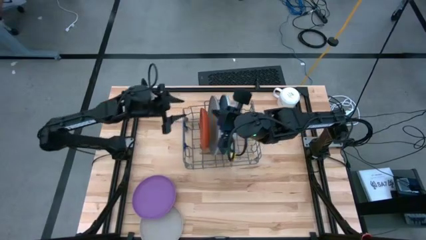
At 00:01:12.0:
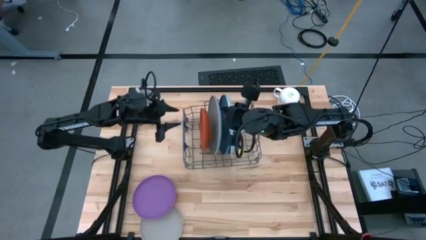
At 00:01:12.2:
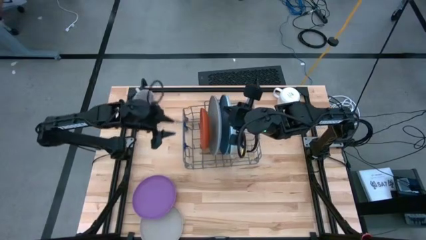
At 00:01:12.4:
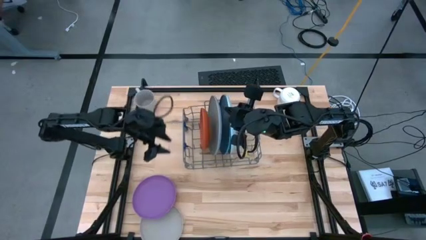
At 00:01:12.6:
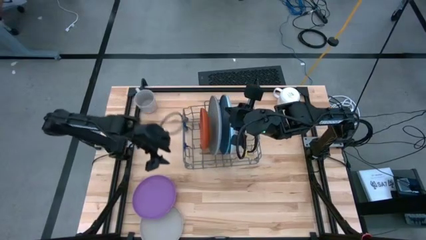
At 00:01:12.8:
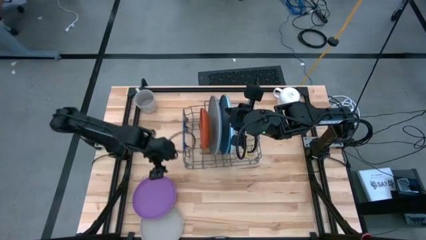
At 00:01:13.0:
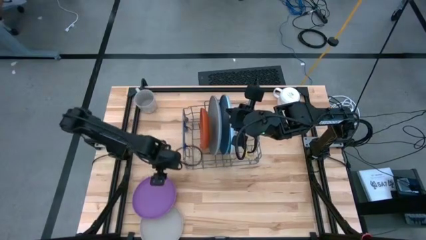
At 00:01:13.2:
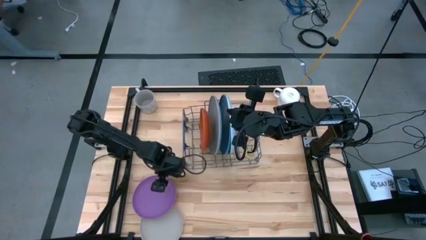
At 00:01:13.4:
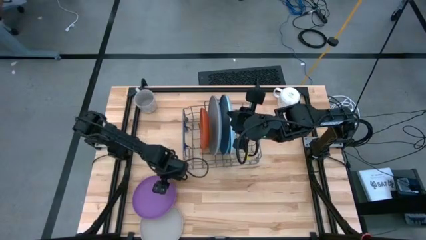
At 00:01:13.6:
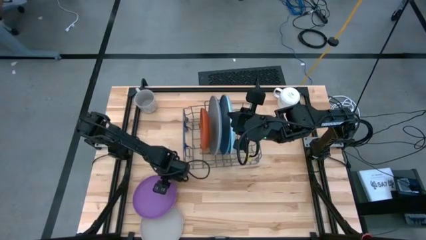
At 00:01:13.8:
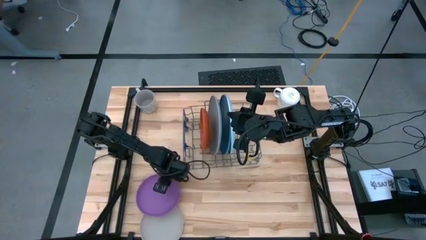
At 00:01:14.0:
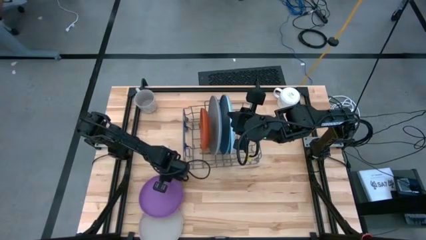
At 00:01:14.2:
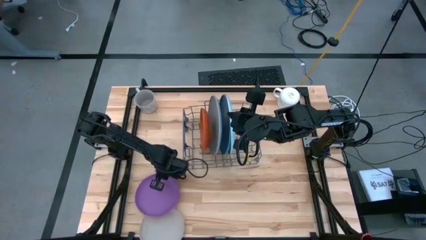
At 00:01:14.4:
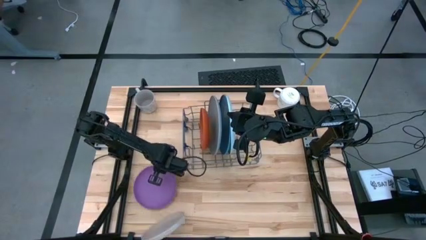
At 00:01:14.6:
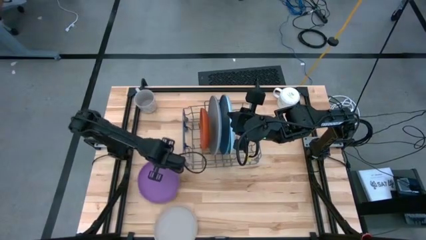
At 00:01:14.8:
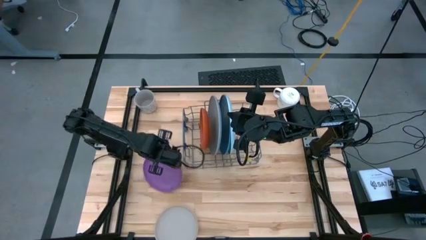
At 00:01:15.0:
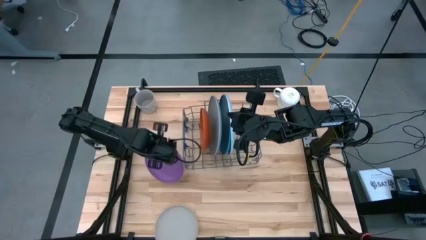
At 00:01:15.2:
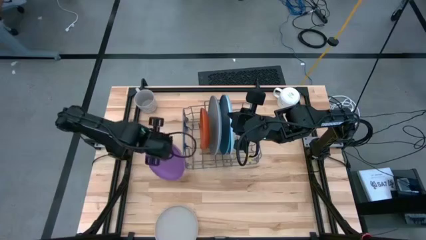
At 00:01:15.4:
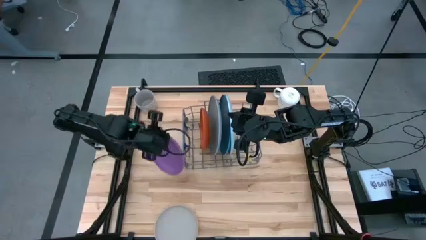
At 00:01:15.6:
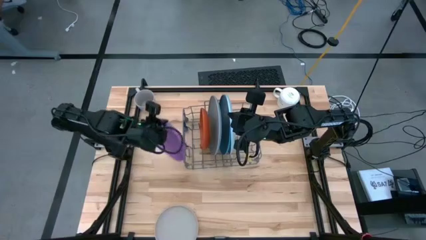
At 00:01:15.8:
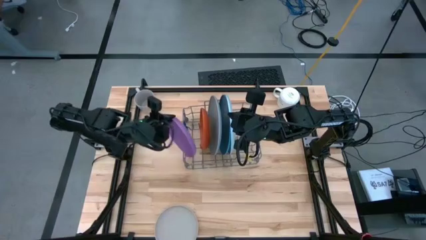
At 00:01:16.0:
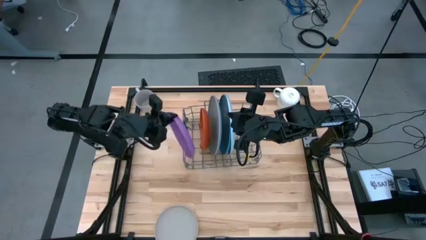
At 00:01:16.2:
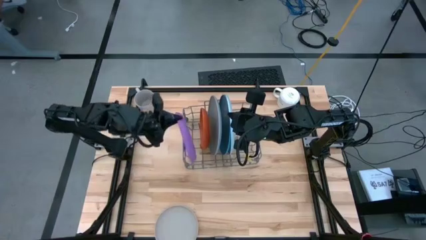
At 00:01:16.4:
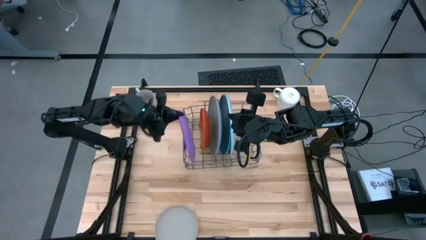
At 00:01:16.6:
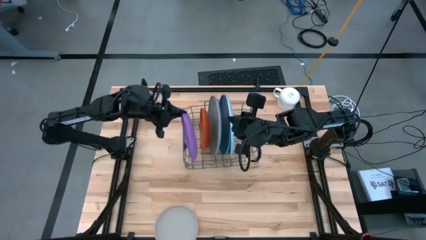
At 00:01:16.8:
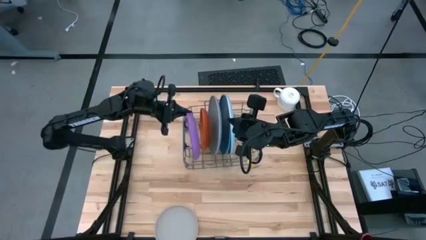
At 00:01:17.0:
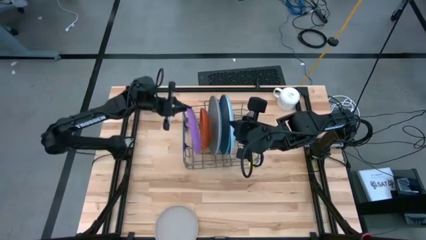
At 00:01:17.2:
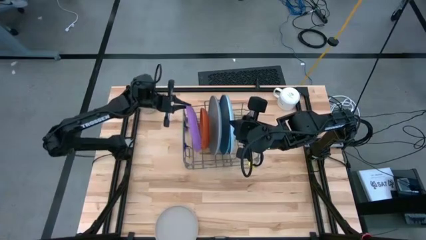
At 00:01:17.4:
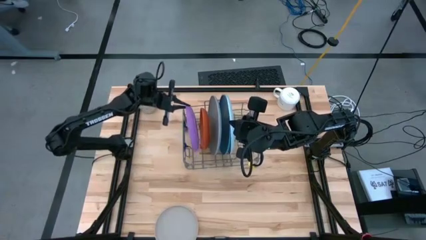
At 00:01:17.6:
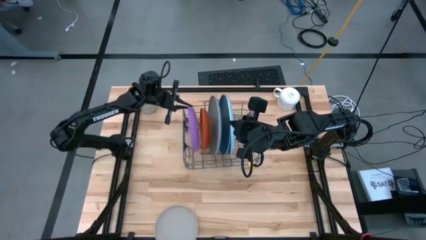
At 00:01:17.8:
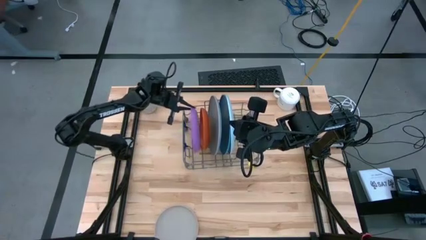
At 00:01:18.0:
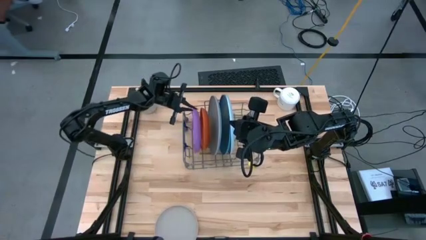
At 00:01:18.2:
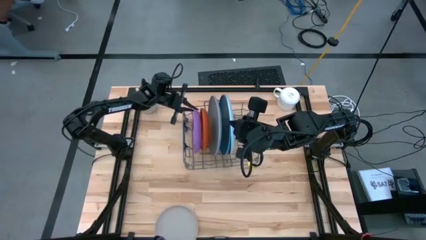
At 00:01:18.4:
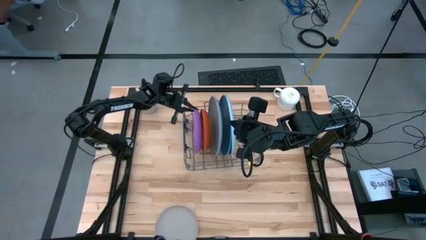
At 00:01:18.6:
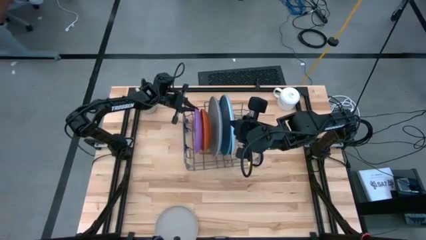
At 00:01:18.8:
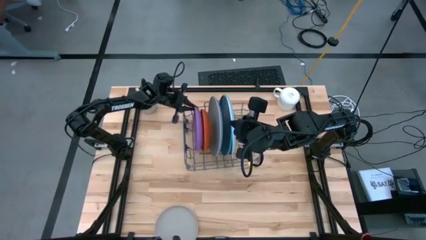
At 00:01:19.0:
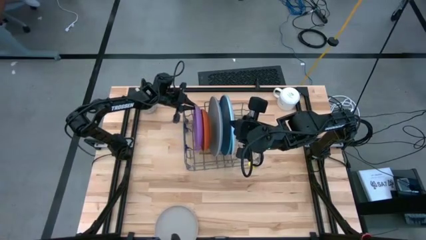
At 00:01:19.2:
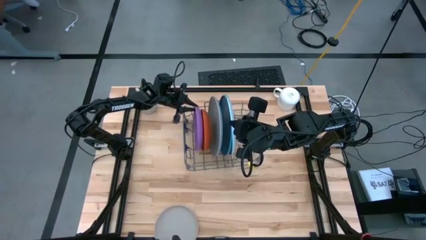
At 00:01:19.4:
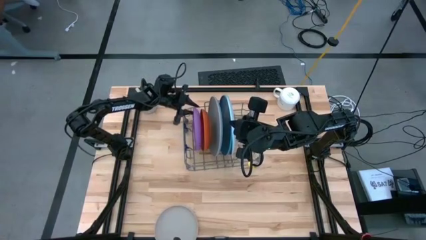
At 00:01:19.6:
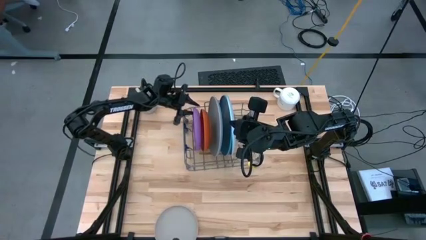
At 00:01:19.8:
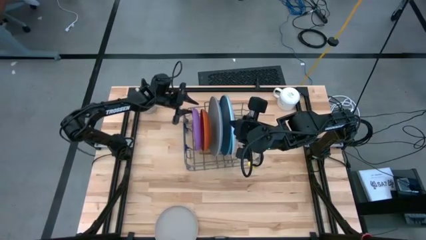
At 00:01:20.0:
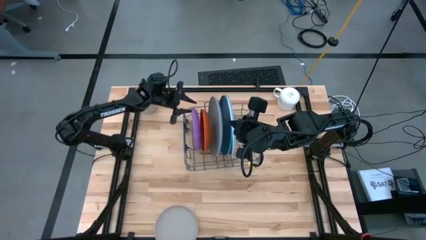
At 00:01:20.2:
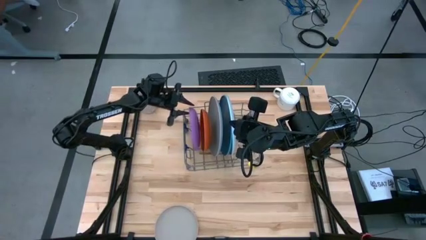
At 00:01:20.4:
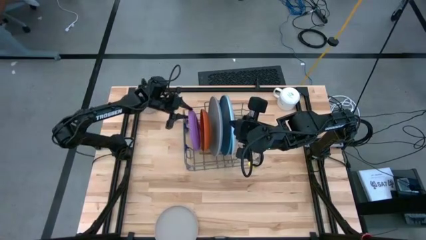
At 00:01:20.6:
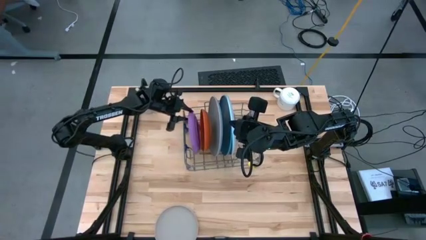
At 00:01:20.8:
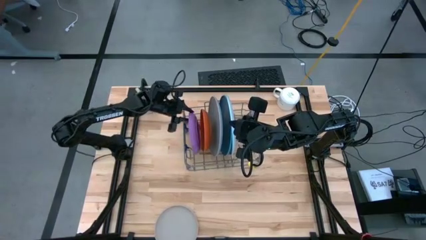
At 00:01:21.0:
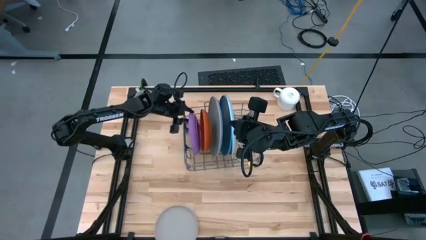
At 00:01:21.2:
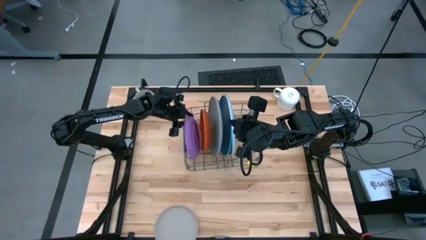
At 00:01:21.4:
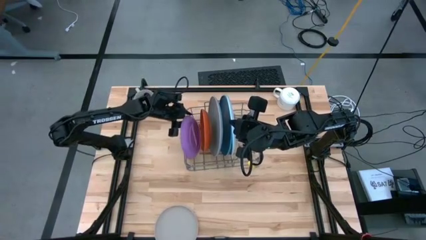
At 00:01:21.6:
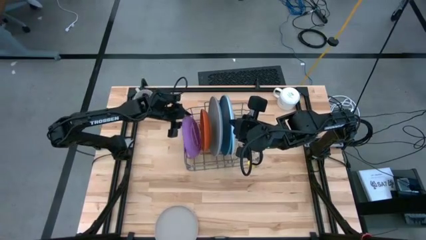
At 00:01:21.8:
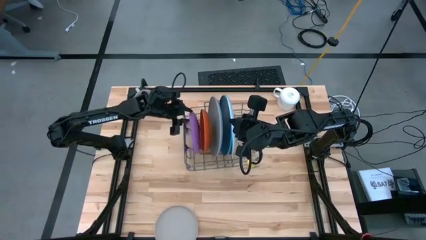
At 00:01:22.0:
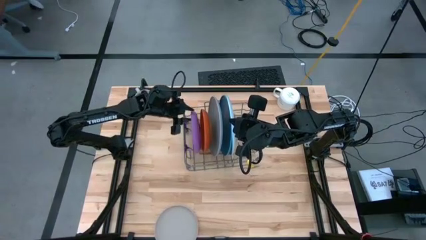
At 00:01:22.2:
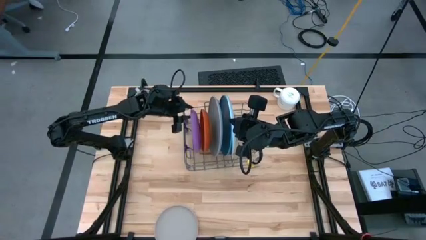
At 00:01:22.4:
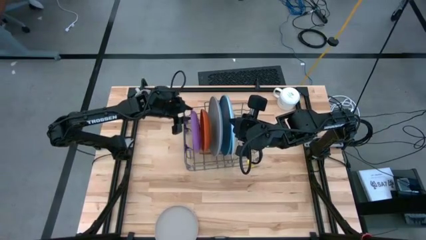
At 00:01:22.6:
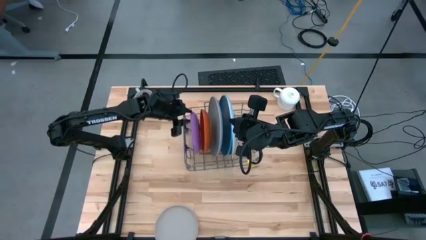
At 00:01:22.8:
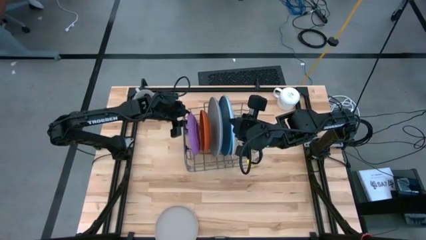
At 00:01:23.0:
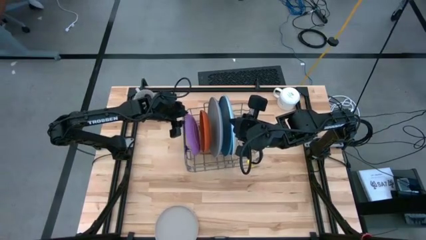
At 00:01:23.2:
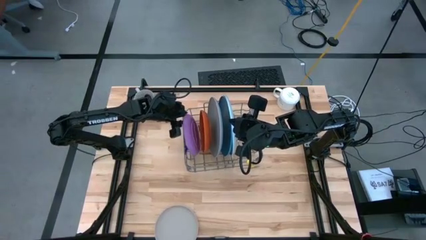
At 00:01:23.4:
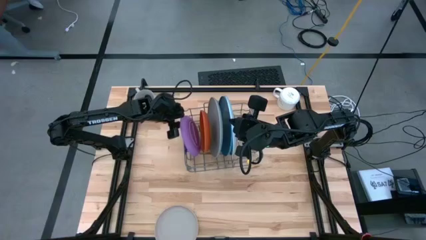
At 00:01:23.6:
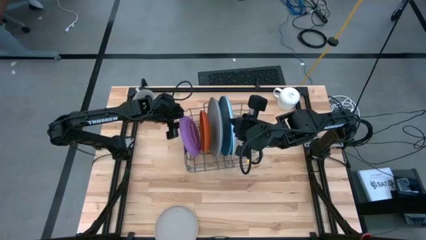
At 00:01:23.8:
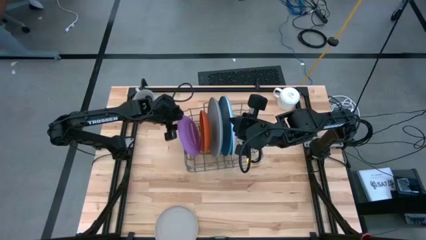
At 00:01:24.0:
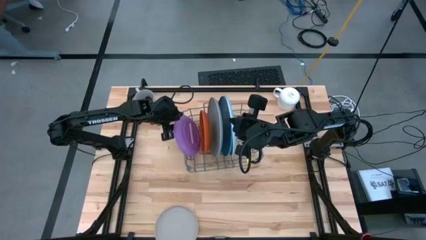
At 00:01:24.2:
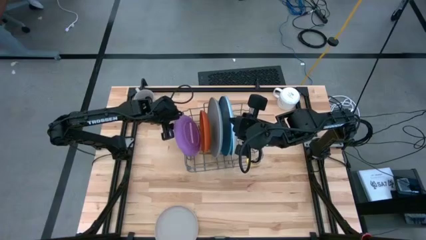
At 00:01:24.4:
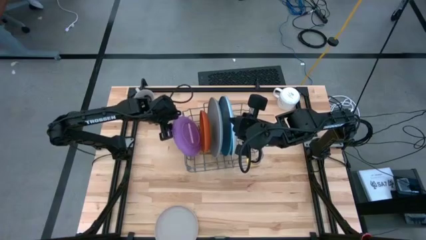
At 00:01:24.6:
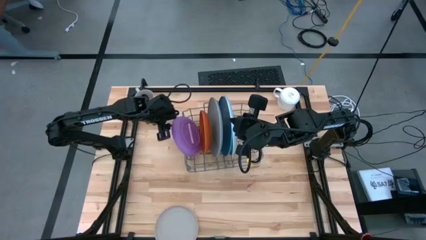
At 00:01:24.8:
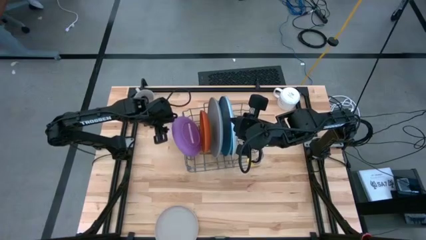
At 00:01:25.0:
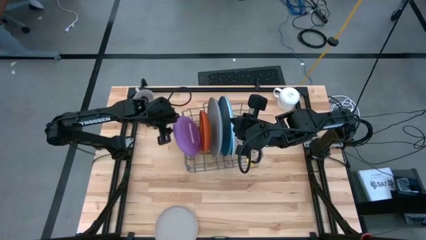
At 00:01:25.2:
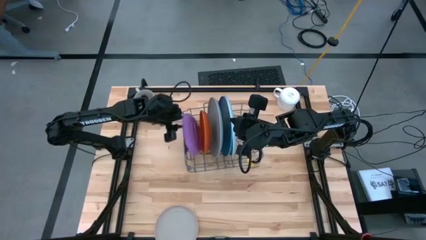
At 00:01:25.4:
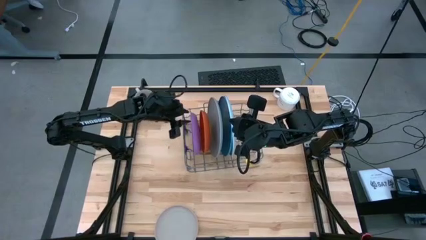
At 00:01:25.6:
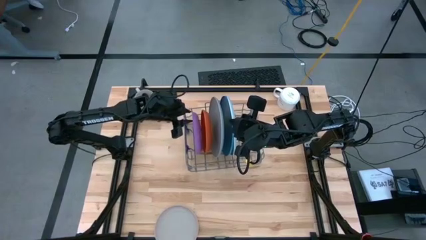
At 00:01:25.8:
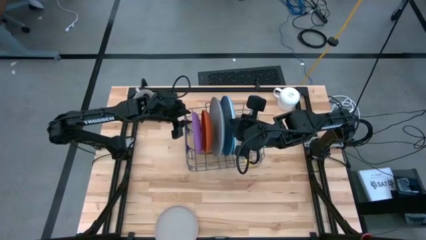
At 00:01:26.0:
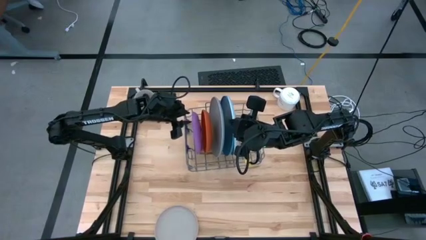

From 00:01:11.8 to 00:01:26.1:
Task: Sort dishes
Put the purple plate in the dish rack

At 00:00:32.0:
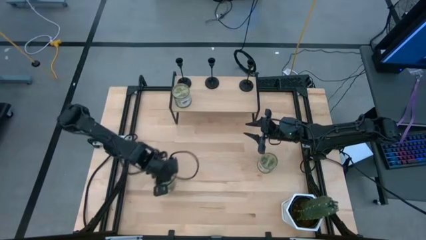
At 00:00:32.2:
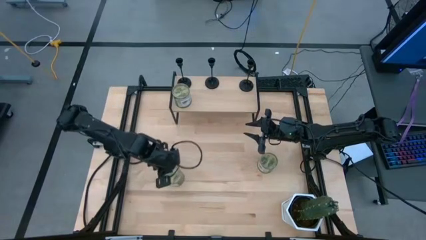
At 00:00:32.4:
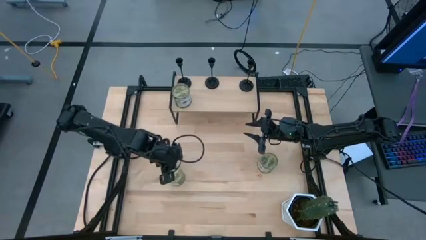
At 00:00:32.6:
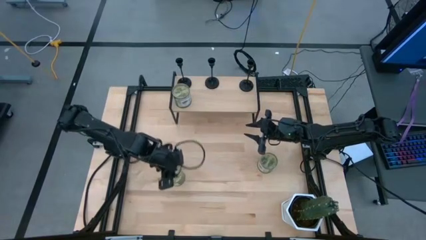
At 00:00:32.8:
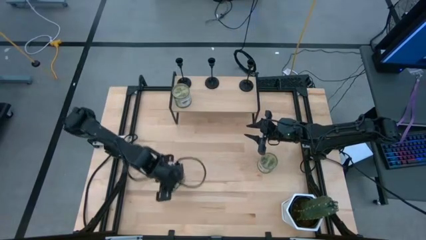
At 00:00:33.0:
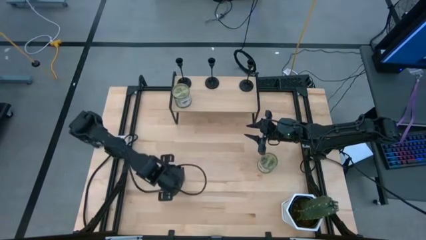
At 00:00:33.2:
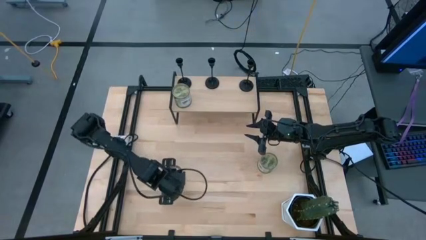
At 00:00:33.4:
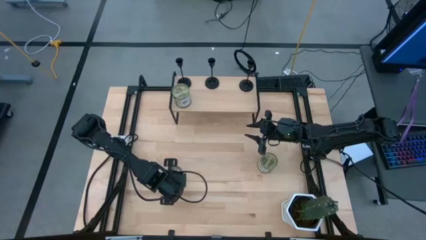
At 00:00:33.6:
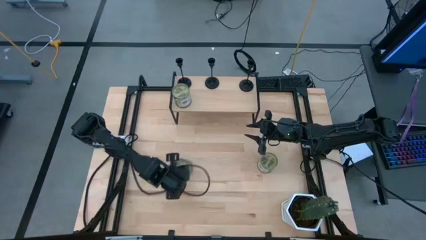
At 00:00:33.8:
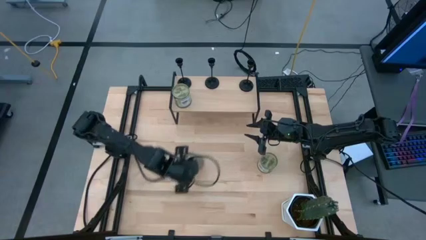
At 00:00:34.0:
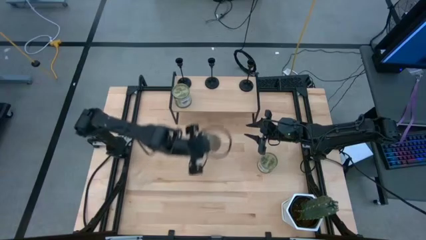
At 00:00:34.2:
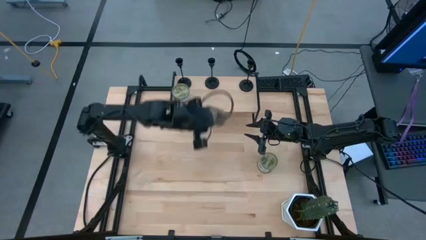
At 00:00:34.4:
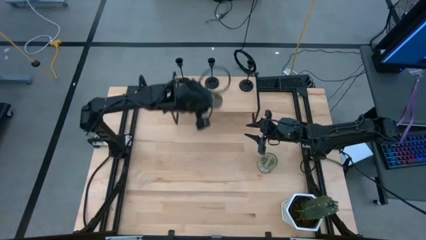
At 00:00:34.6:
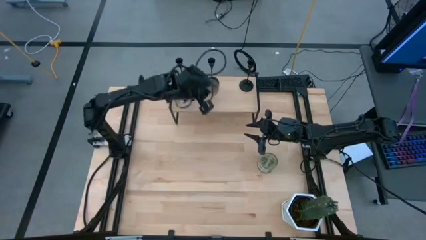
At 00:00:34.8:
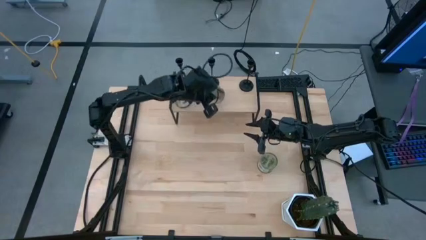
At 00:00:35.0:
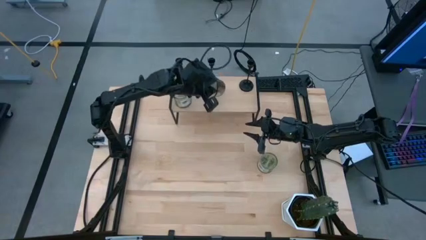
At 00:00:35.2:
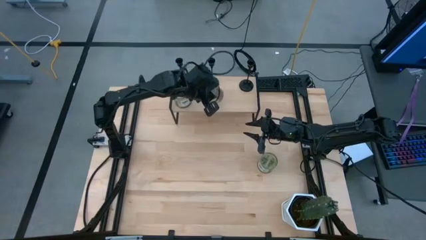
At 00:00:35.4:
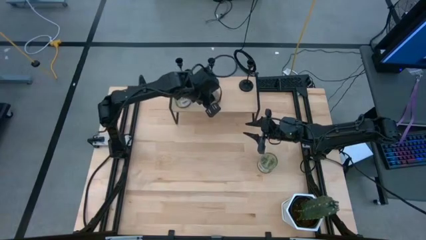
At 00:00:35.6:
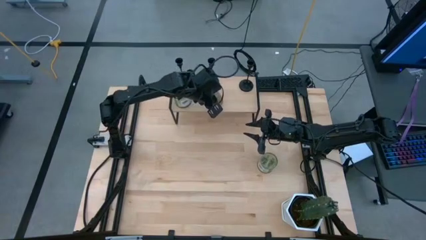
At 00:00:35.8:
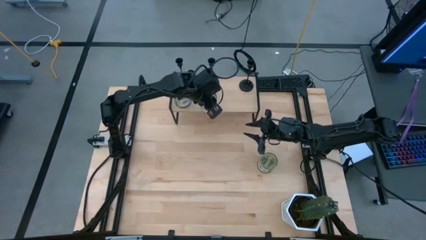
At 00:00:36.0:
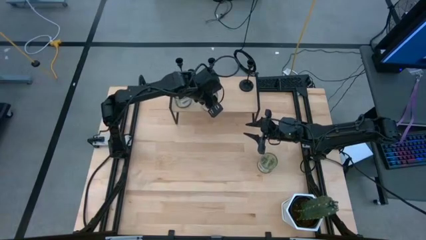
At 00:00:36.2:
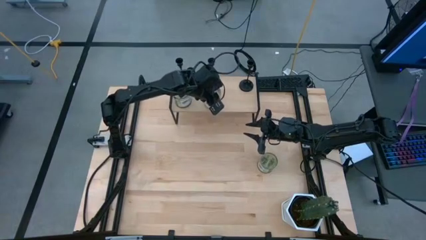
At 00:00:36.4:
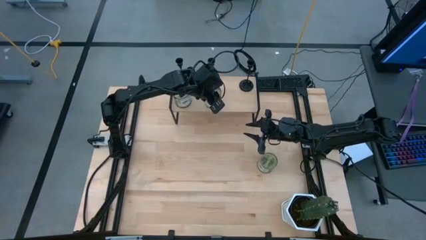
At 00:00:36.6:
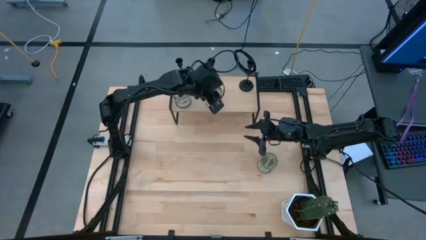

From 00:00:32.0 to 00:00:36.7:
Task: Pick & Place candle stick holders
Put the bottom scented candle on the shelf
